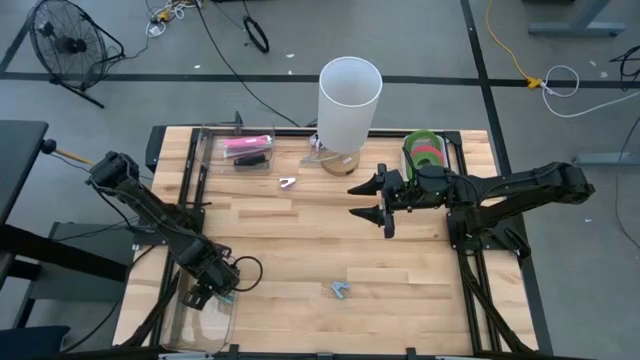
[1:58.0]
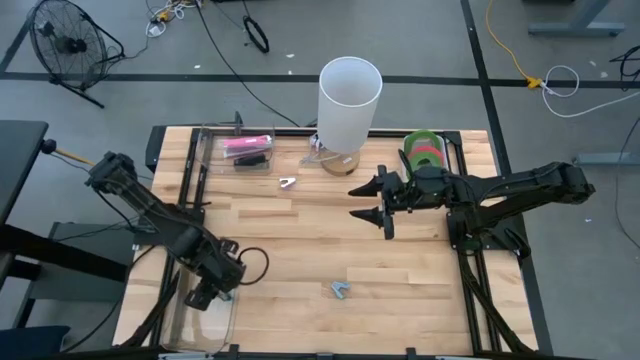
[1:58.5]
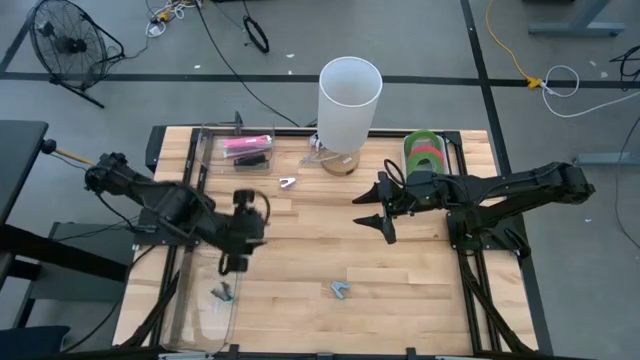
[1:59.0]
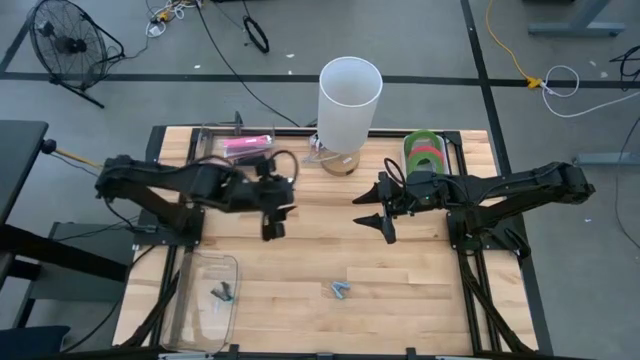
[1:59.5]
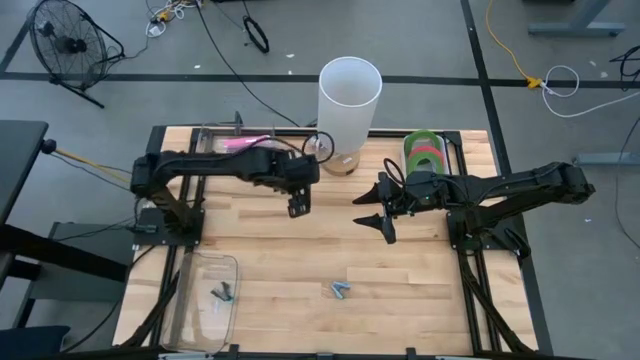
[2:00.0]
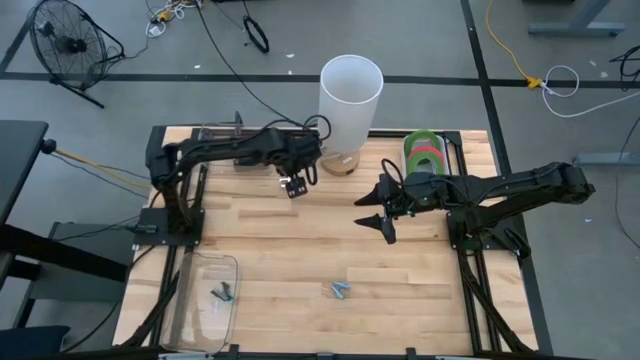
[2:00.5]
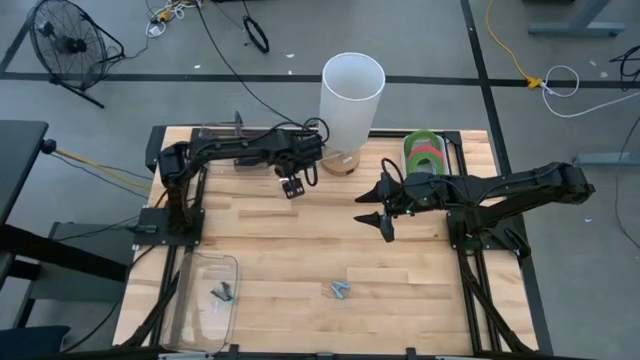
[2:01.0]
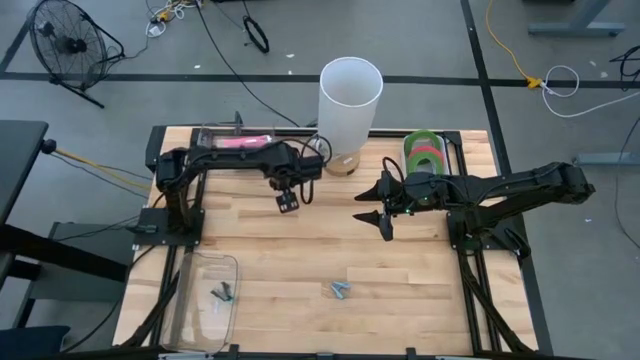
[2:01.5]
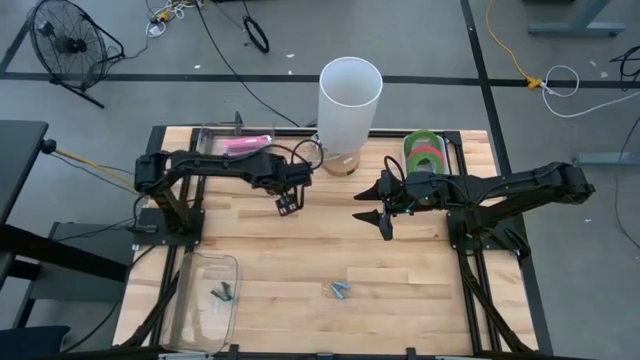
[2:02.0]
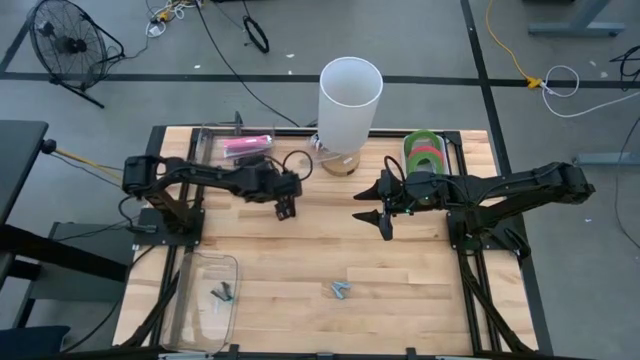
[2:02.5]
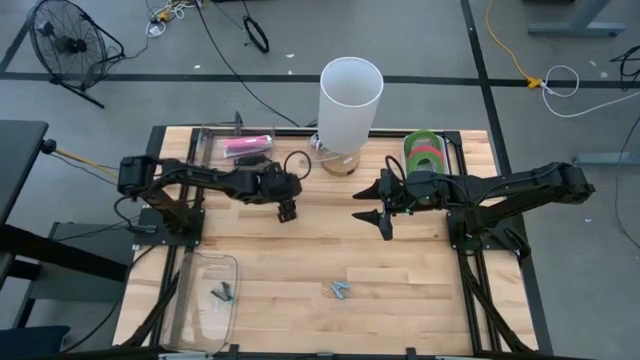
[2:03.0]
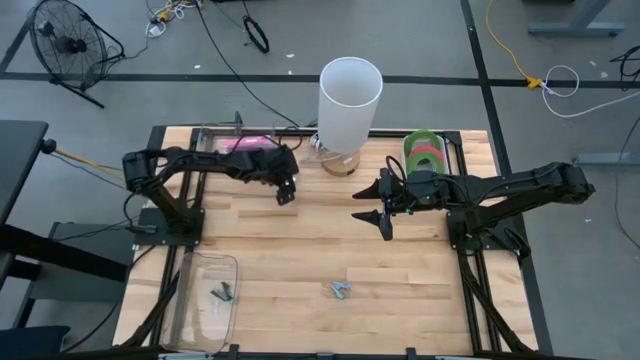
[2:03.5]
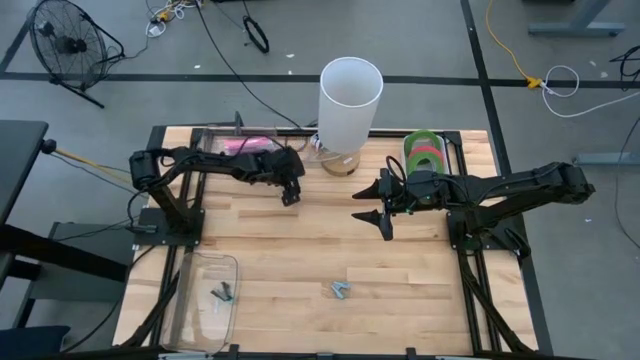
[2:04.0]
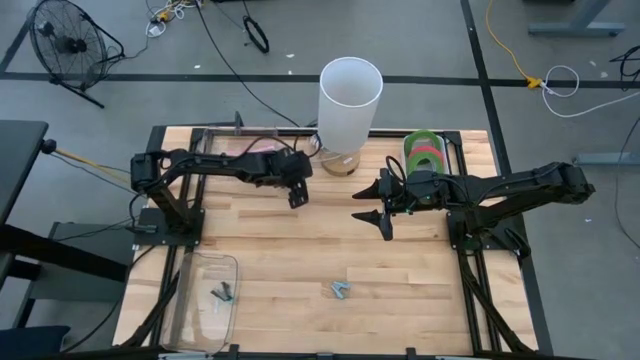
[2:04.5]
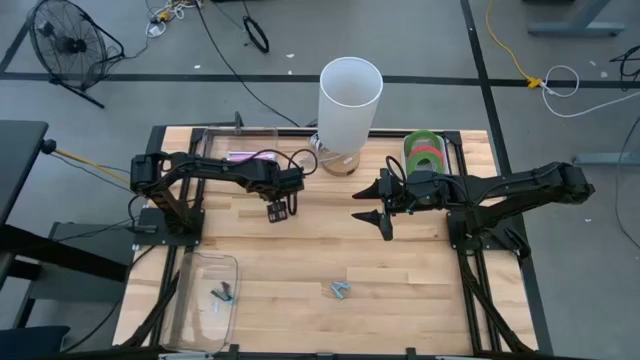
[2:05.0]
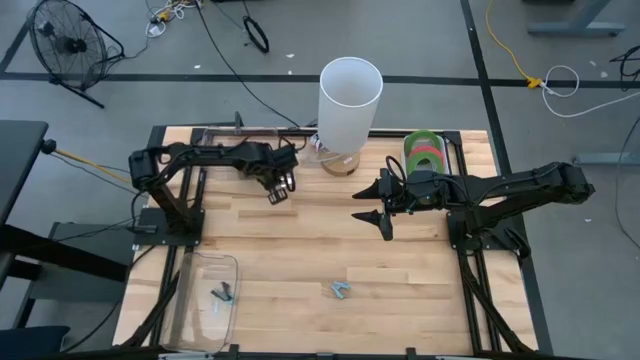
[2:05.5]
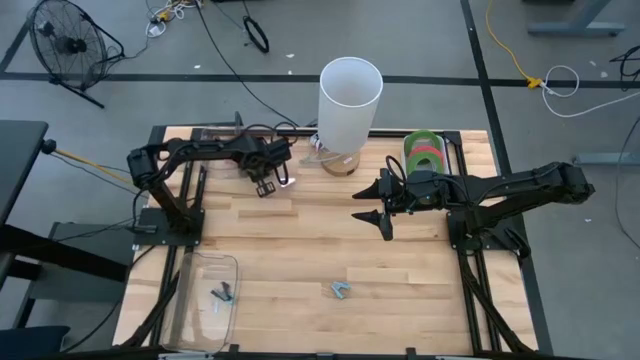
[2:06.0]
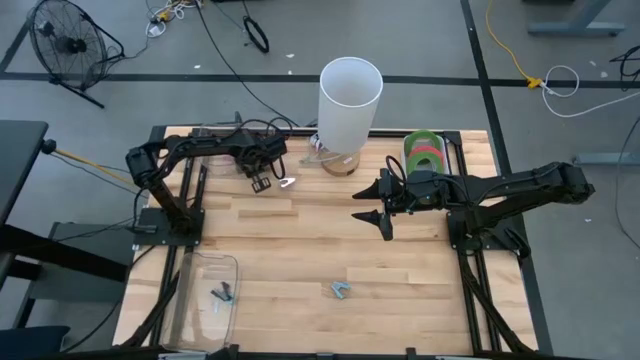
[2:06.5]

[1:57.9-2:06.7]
Task: Pick and place Stapler, Stapler remover, tape
Adjust the top transparent bin

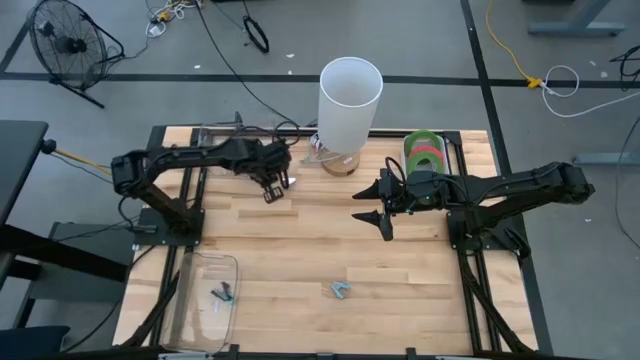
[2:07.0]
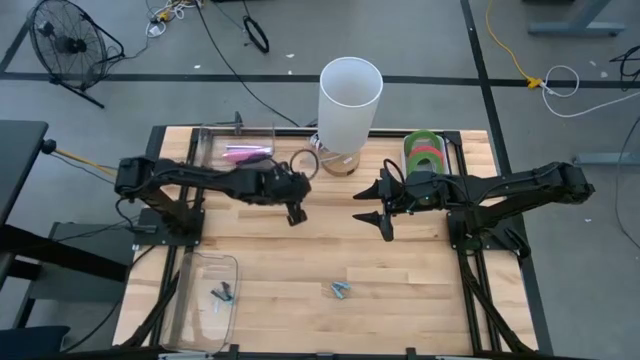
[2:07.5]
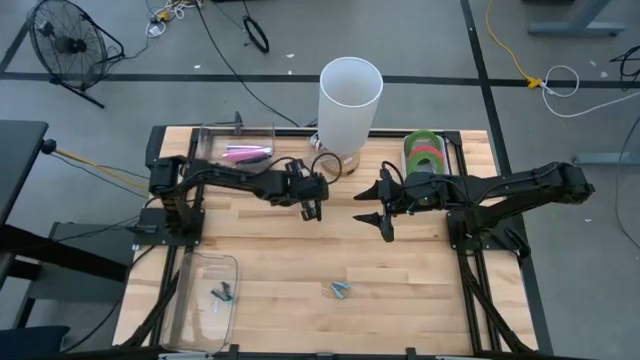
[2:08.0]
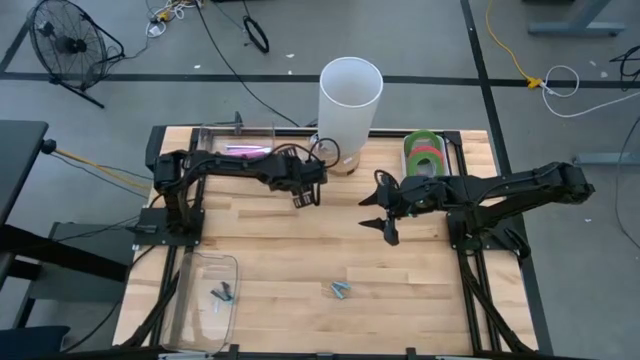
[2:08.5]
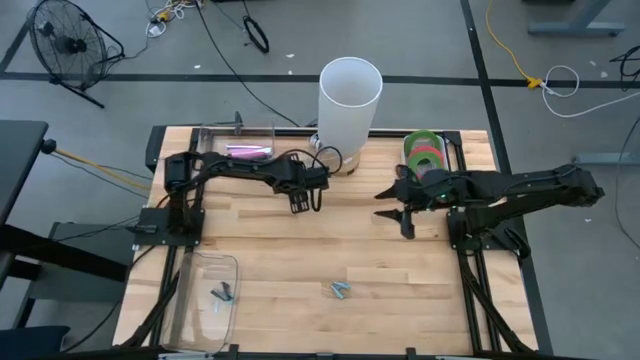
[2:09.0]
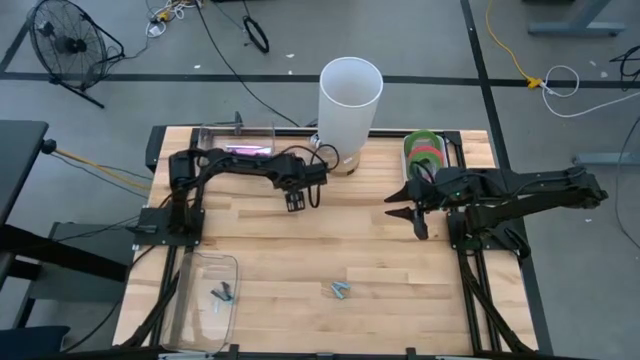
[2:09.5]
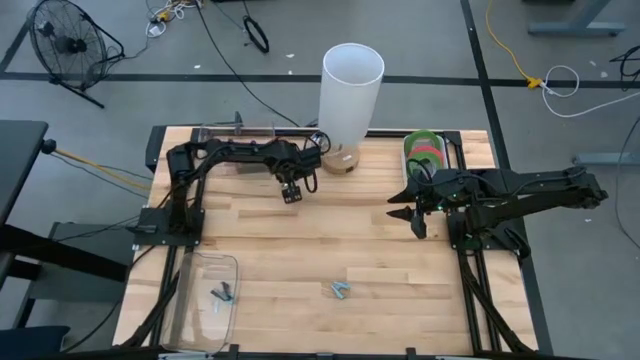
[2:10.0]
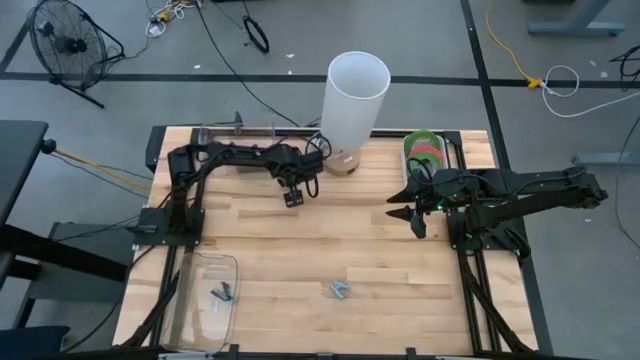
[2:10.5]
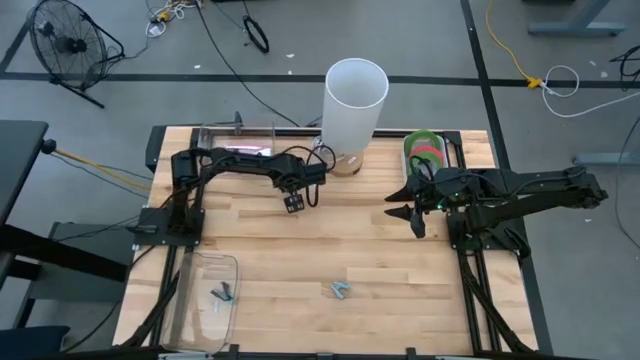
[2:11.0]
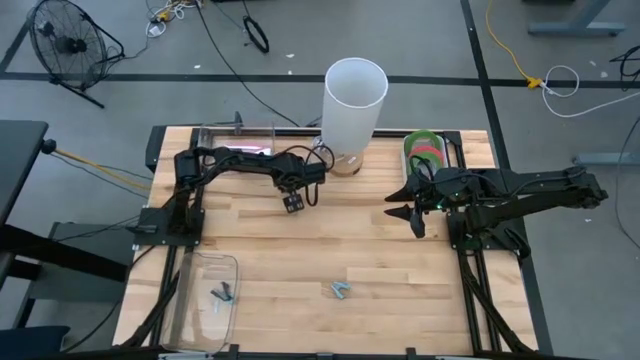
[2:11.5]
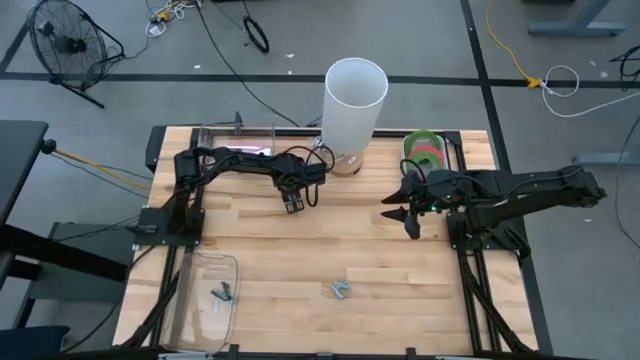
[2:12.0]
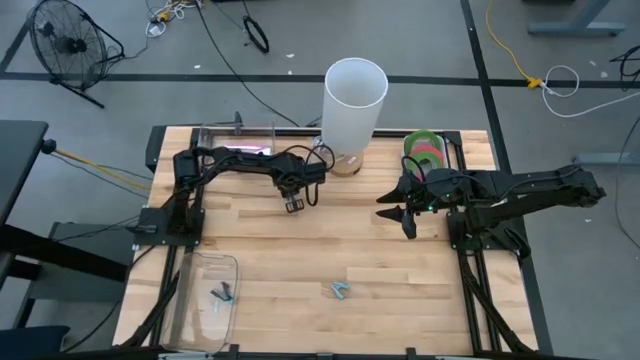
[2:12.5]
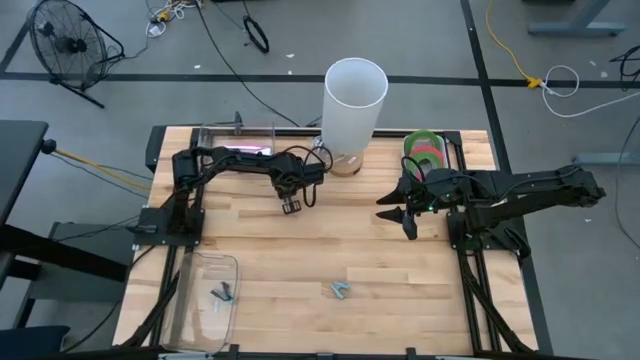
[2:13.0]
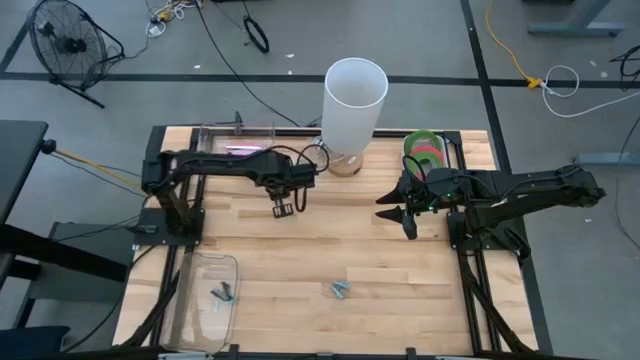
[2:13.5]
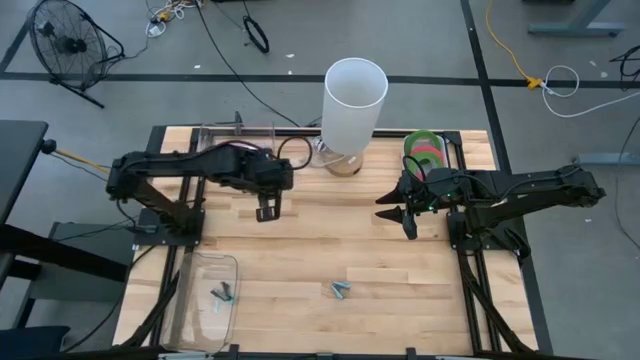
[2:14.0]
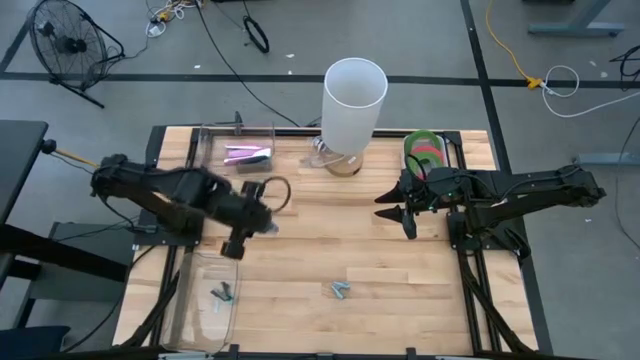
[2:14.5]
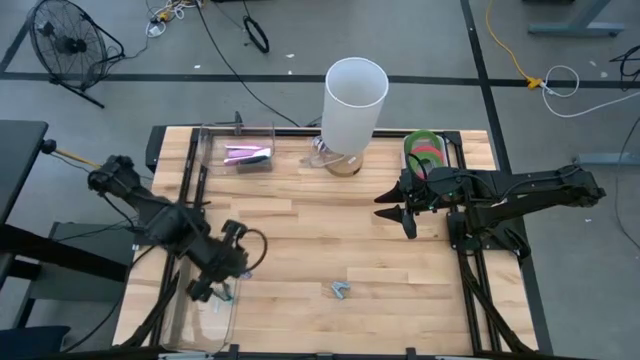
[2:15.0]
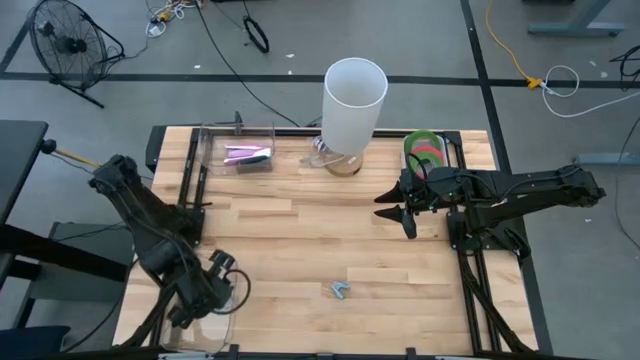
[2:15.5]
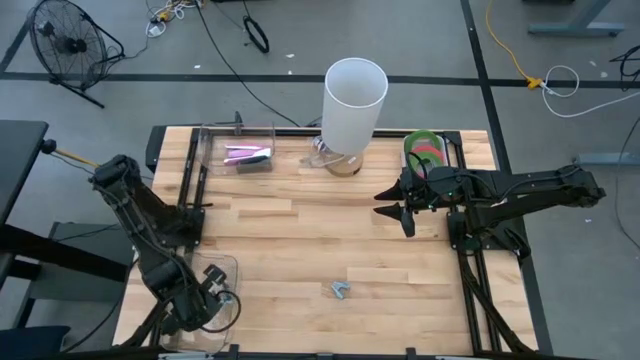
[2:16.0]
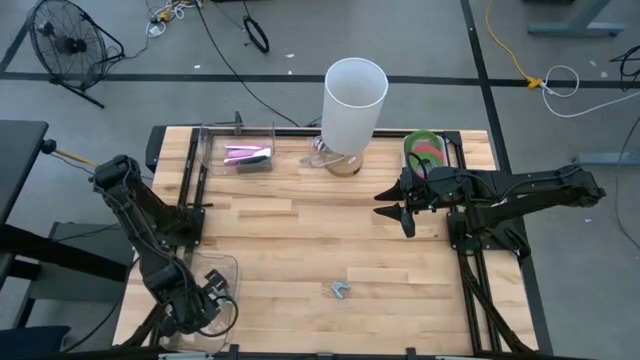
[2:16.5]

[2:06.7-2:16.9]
Put the violet staple remover into the bottom transparent bin
